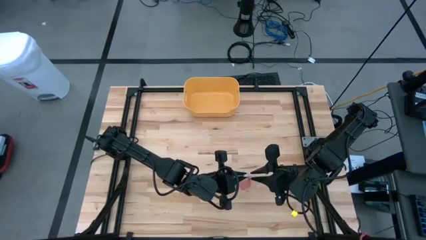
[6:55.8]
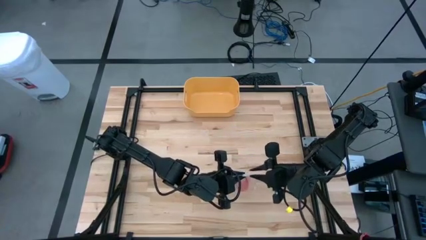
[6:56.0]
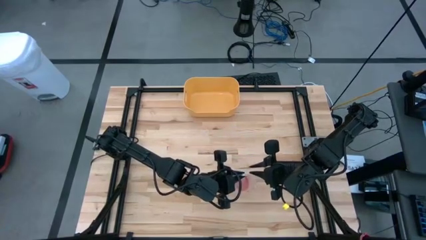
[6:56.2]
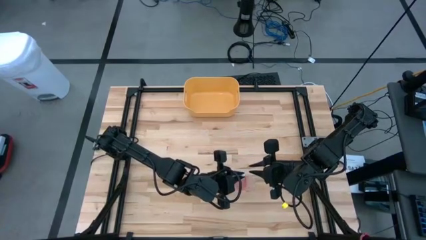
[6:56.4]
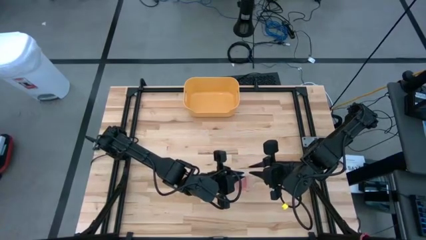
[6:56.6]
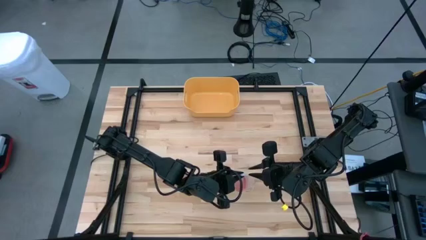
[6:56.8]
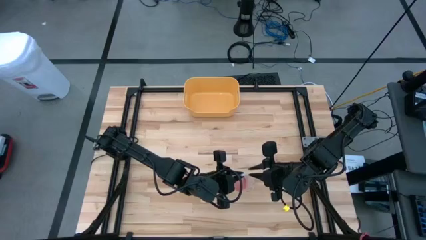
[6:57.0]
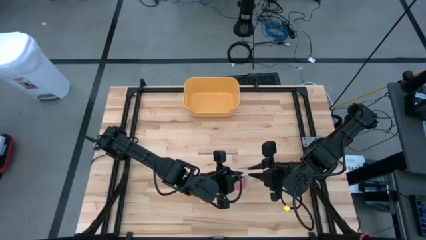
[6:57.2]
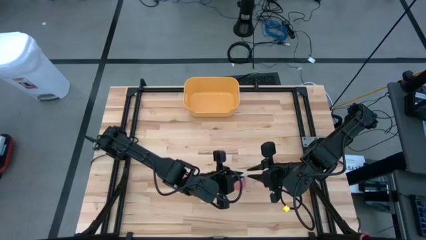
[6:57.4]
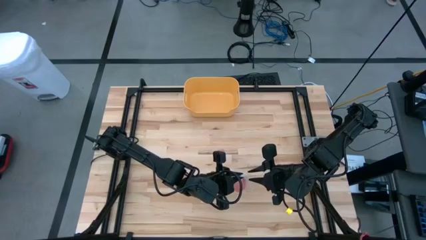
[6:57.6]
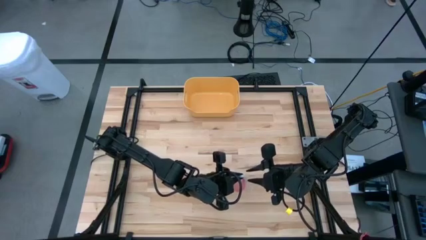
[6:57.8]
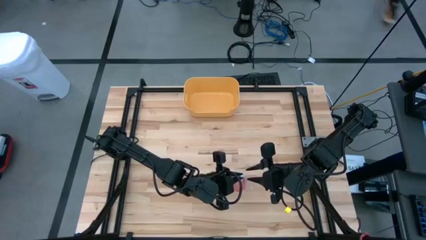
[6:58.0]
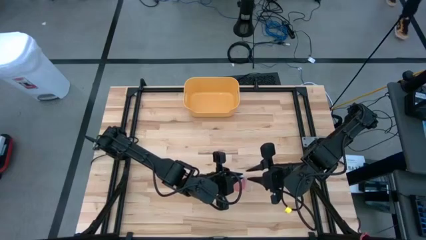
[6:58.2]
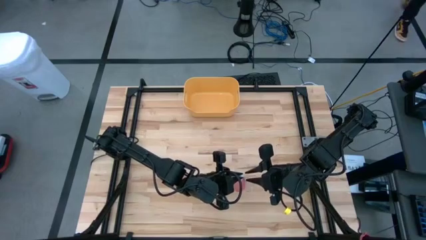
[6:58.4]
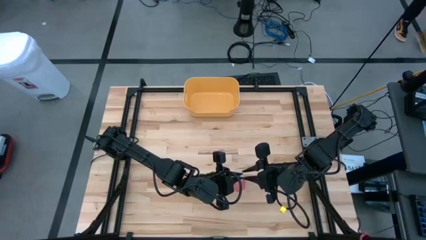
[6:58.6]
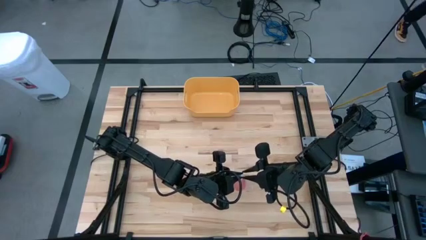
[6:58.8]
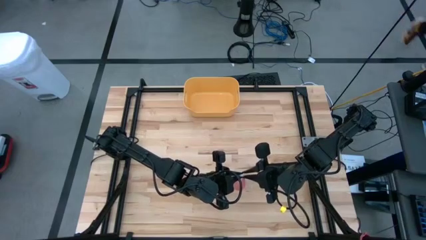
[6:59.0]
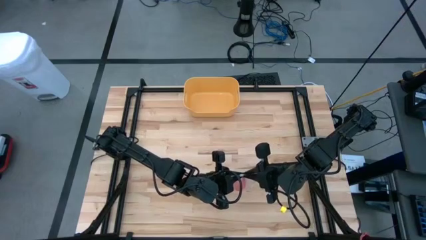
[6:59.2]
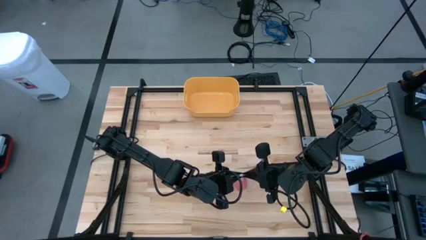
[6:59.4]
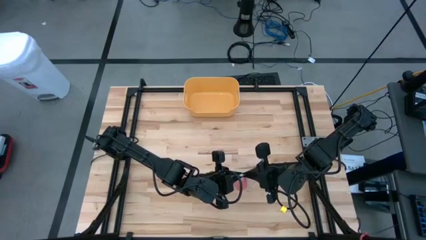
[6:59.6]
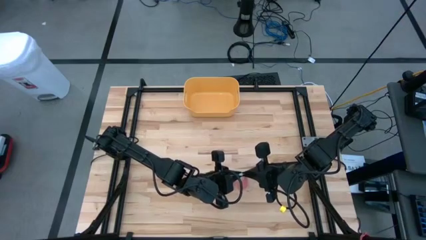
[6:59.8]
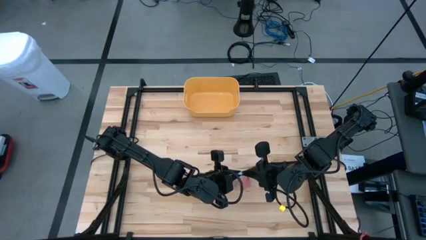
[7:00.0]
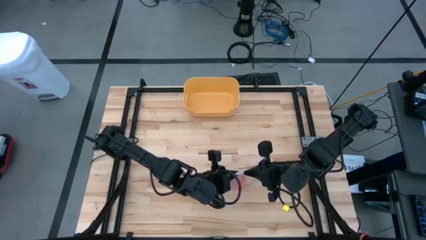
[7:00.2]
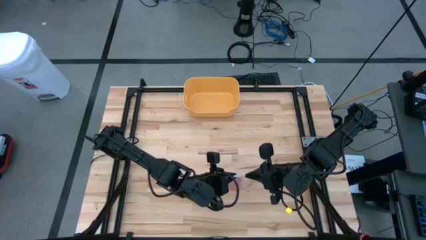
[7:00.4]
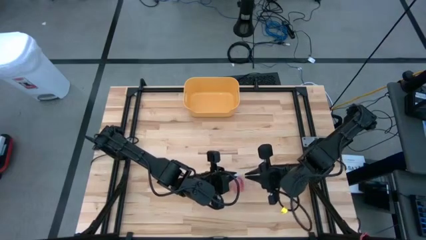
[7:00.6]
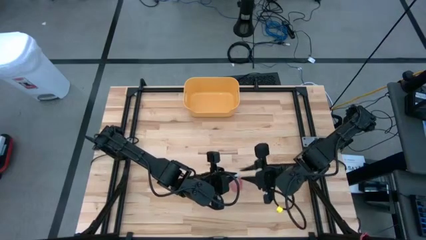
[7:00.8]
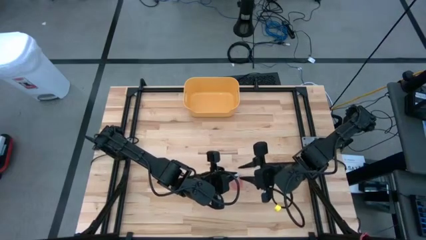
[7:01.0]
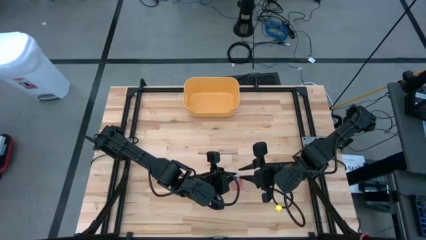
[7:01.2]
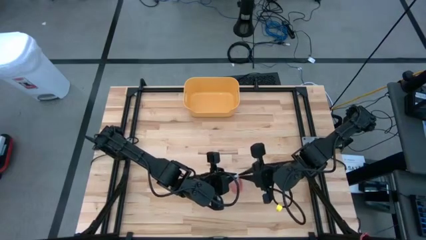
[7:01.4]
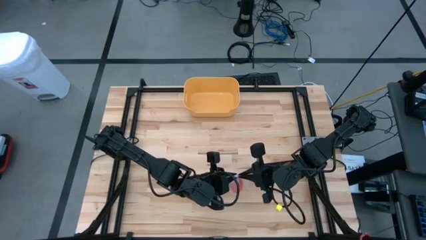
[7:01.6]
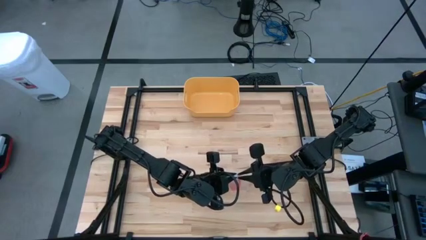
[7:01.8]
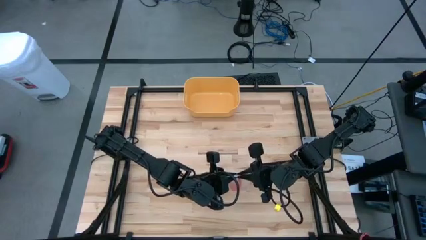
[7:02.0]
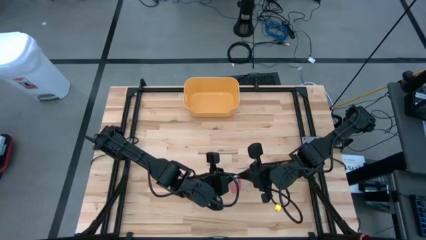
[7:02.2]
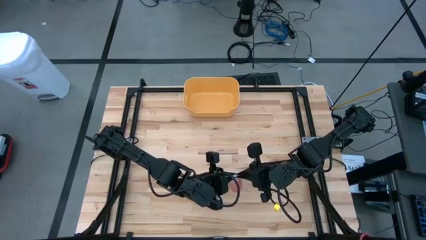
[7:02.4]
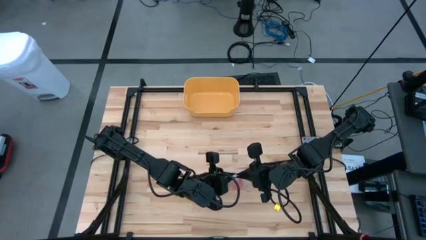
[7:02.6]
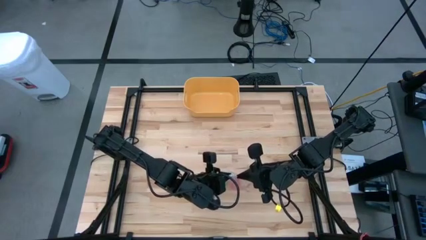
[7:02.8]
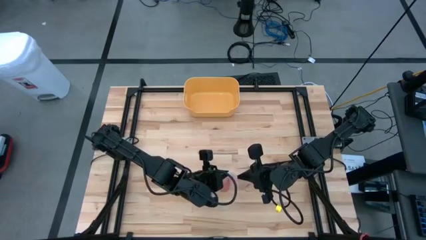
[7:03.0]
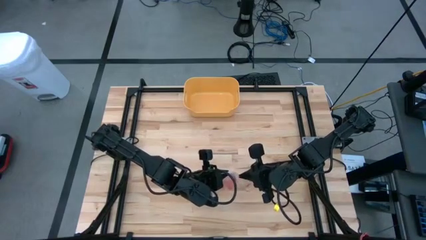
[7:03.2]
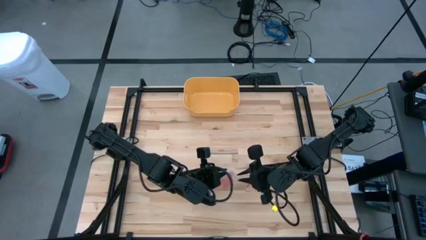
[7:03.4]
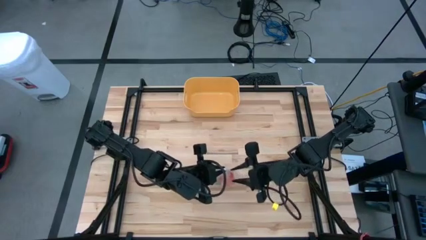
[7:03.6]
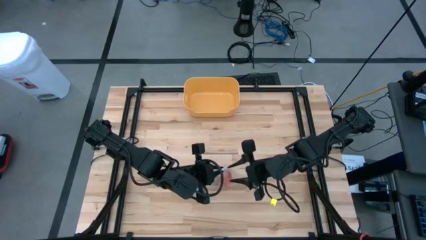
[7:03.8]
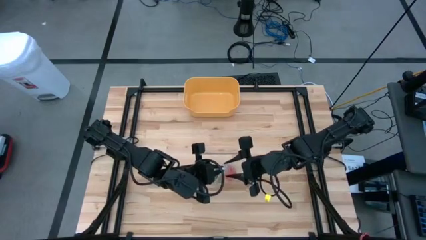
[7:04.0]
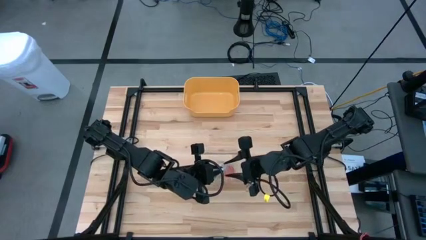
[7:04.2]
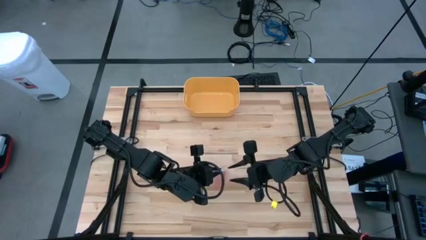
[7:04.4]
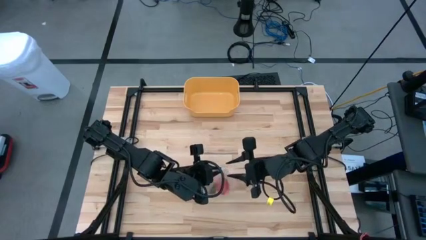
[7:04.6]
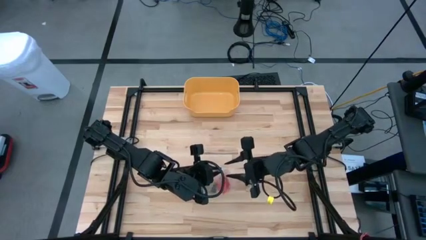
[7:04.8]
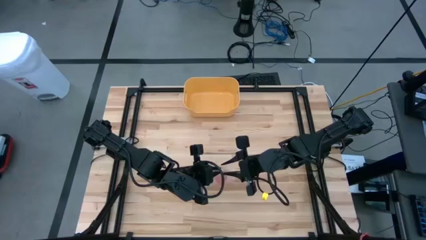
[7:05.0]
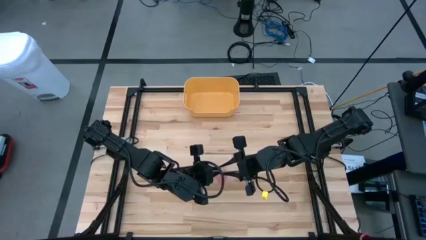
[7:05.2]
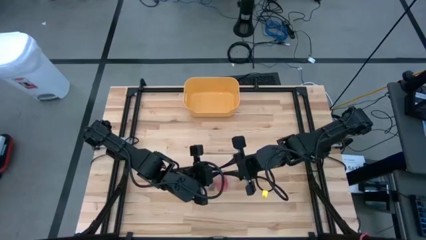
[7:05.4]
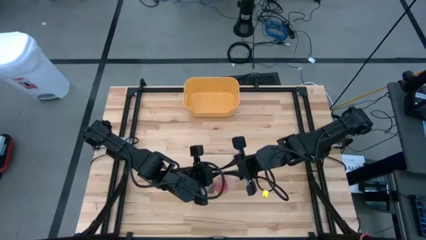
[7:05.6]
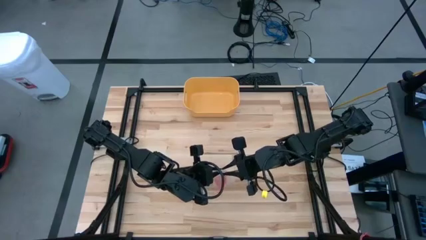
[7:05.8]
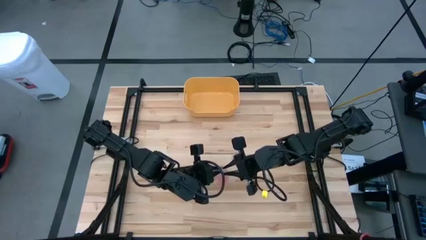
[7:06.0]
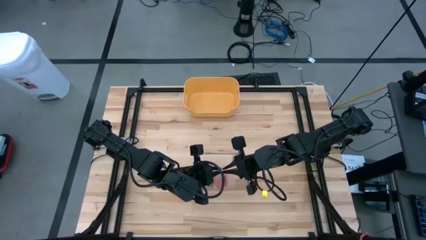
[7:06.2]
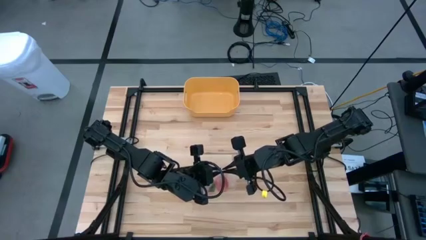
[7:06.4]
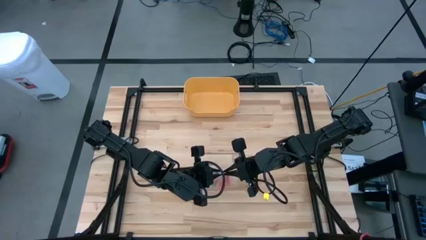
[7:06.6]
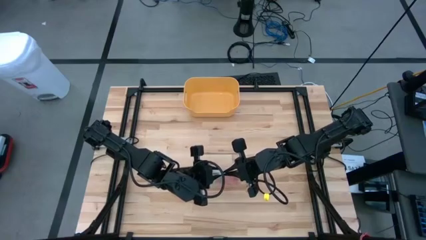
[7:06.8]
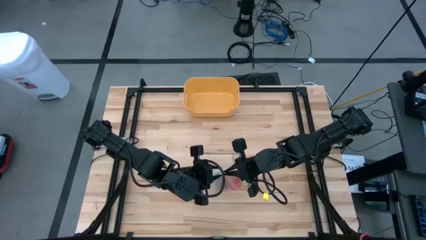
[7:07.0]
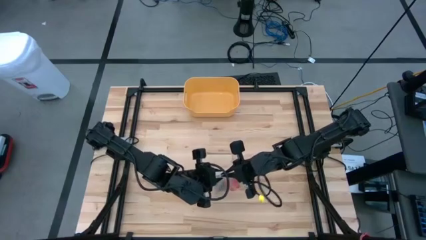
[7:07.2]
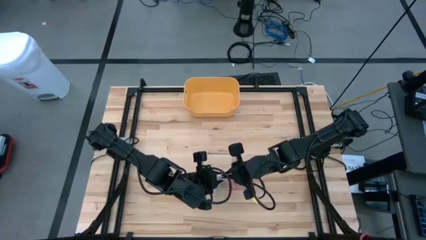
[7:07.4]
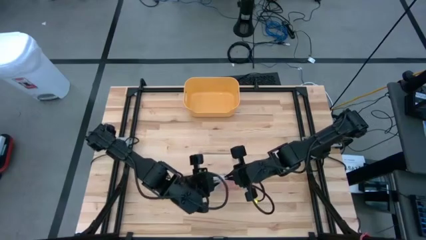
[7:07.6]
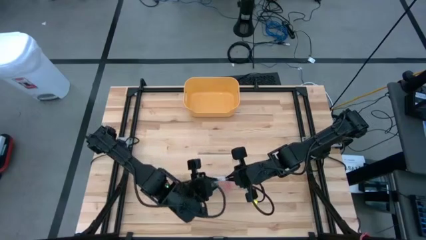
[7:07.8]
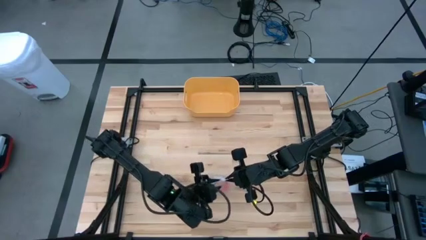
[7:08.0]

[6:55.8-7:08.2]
Task: Roll bandage
Close the transparent zip bag

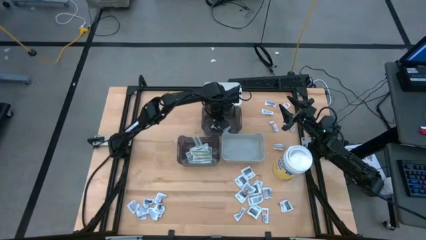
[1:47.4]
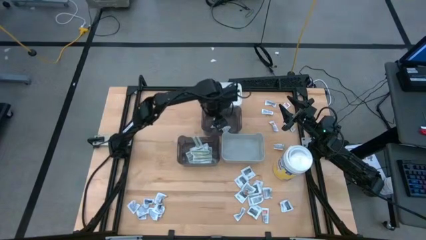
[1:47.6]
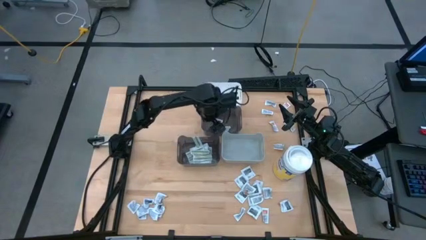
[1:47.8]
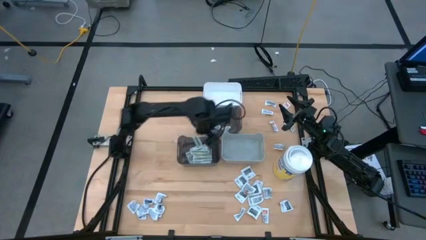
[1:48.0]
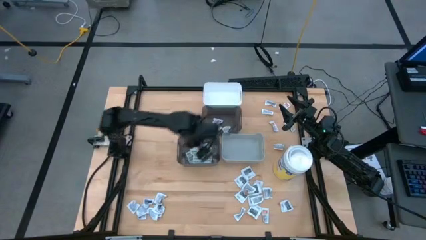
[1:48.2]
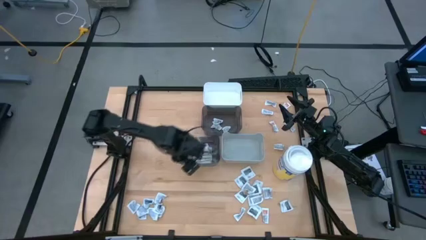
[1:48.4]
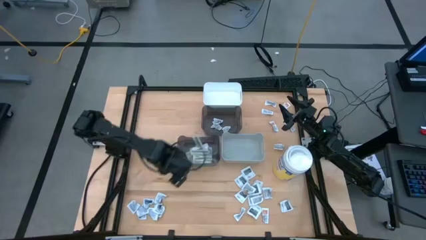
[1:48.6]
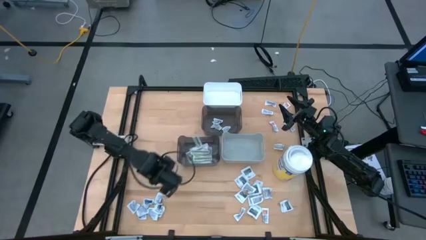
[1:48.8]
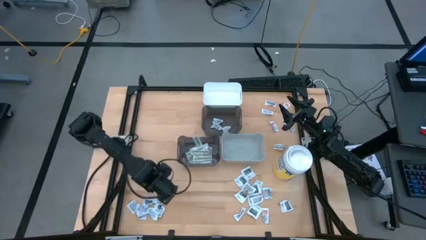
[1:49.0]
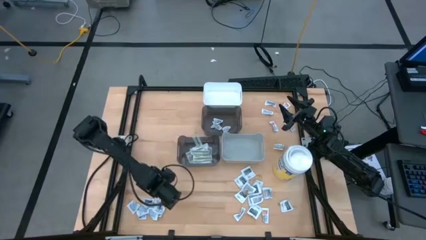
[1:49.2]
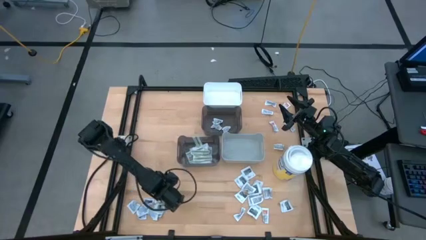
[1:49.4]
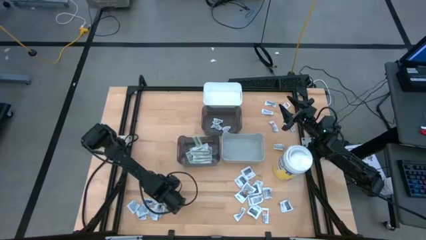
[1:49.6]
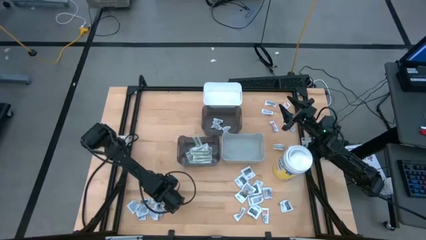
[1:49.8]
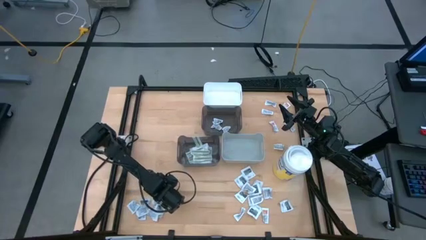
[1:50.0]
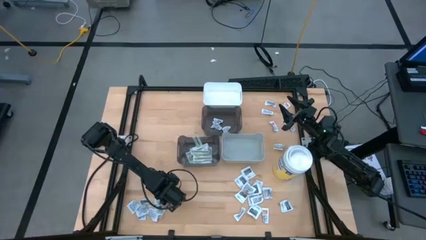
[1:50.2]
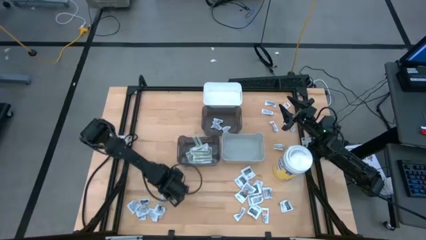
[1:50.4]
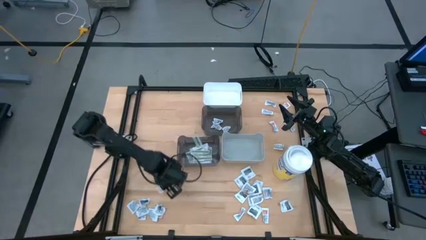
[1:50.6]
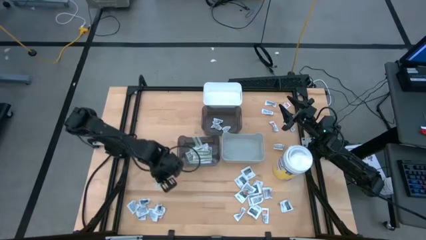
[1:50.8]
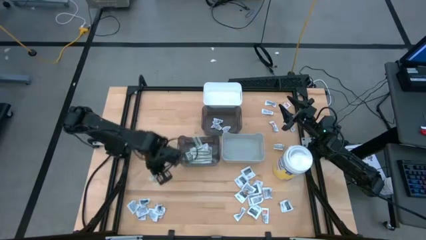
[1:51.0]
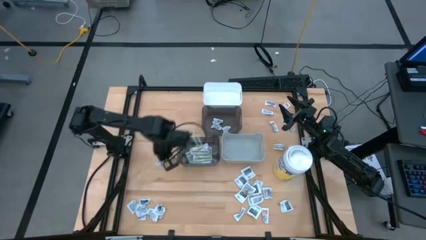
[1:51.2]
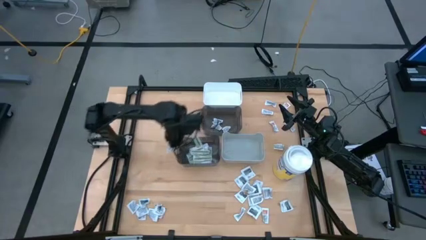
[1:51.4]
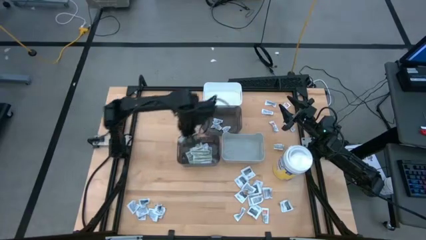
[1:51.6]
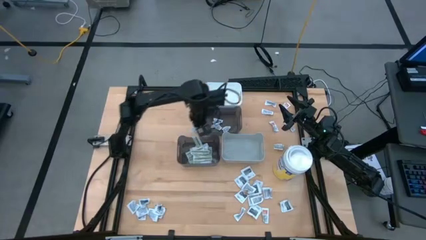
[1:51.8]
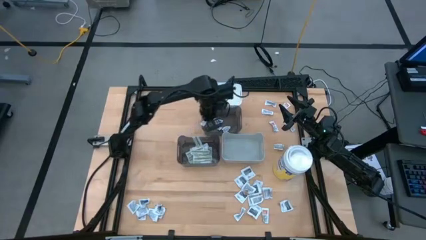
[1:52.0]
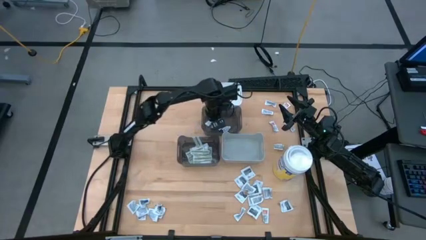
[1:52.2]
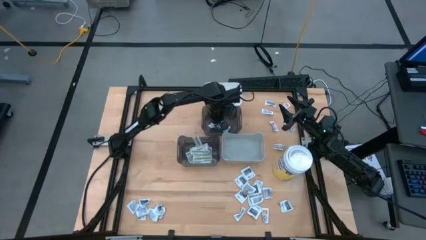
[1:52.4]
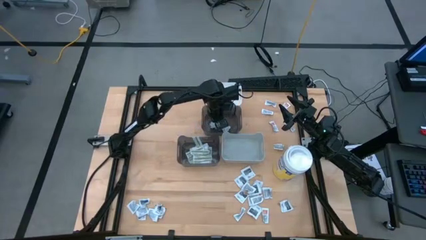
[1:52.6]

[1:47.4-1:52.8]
Task: Pick & Place First Aid Supplies
Put the white alcohol pad into the top black bin
